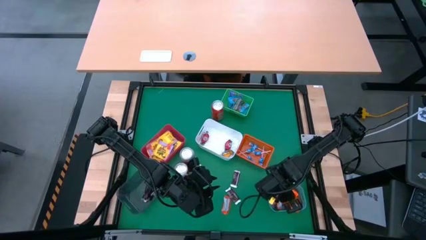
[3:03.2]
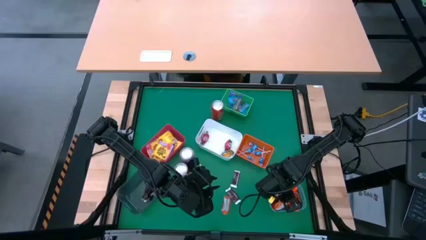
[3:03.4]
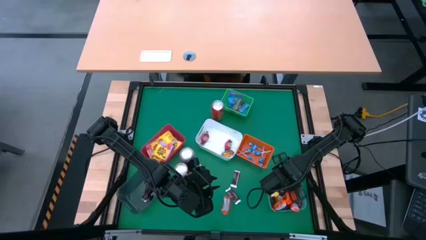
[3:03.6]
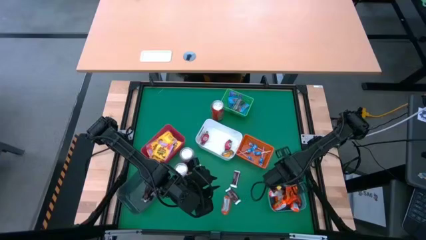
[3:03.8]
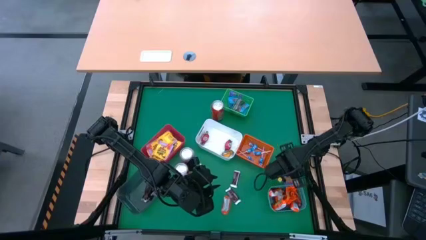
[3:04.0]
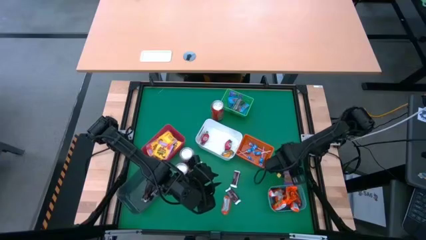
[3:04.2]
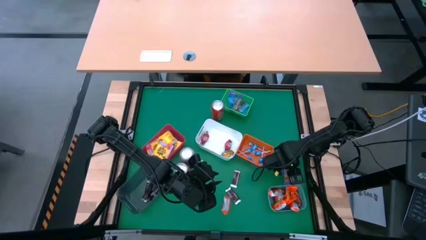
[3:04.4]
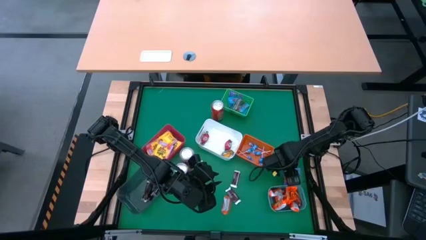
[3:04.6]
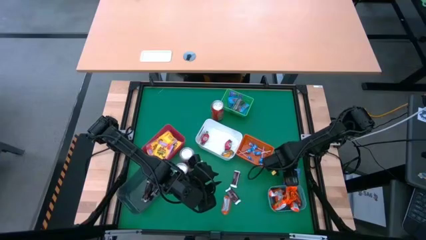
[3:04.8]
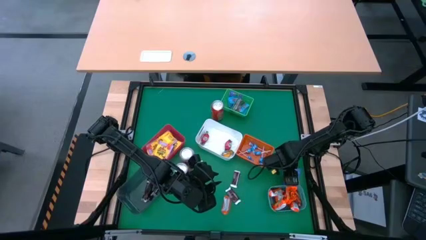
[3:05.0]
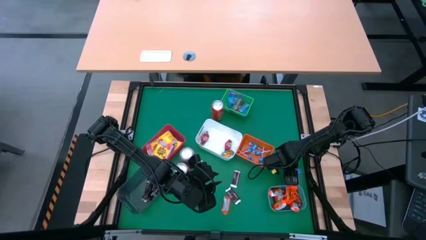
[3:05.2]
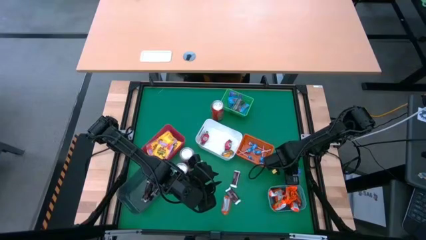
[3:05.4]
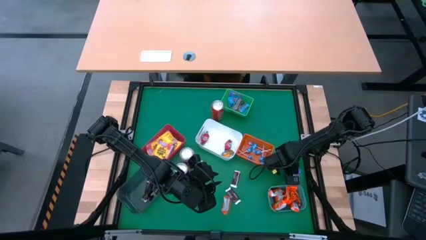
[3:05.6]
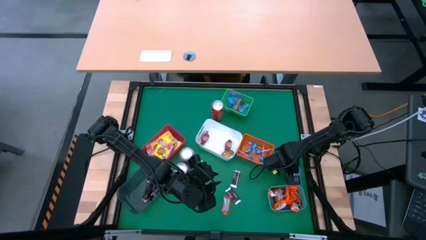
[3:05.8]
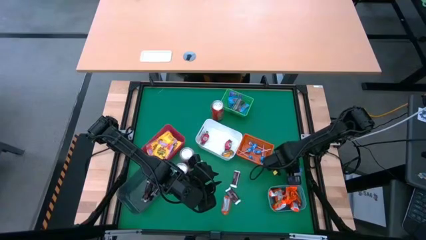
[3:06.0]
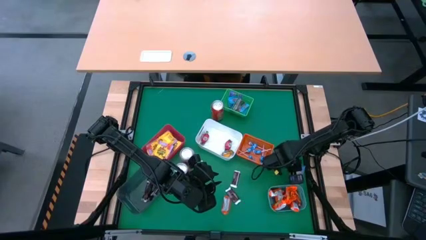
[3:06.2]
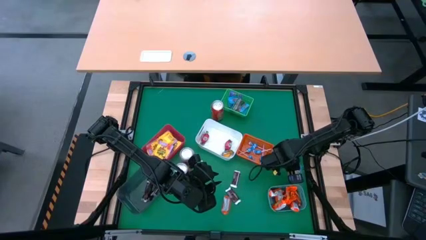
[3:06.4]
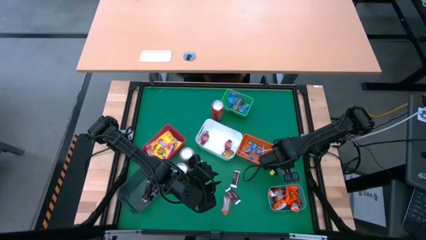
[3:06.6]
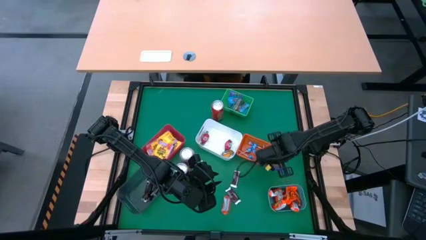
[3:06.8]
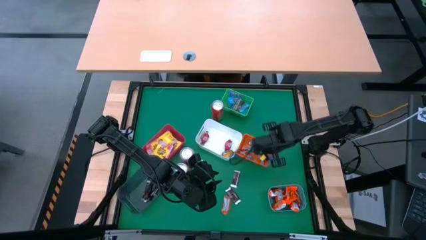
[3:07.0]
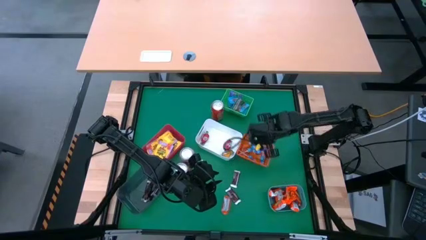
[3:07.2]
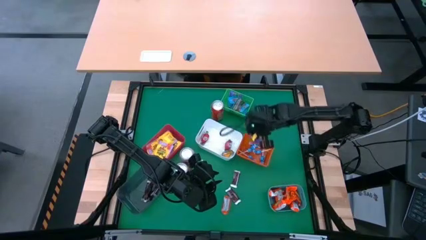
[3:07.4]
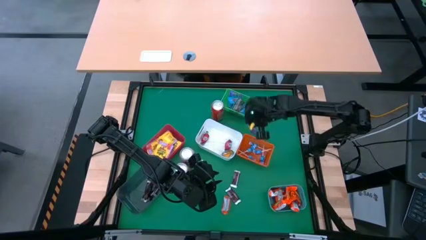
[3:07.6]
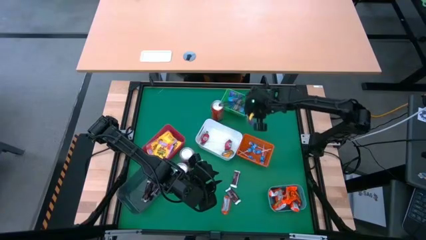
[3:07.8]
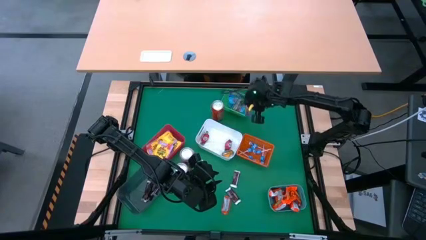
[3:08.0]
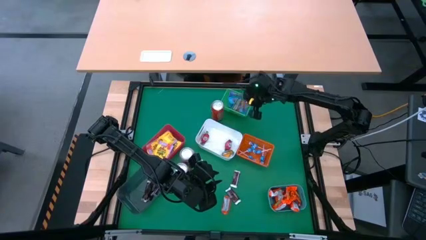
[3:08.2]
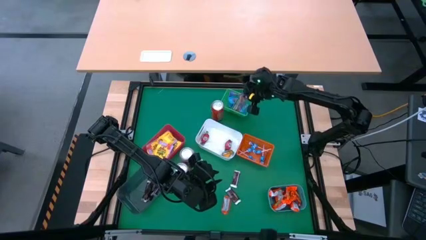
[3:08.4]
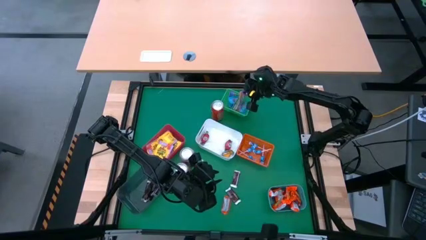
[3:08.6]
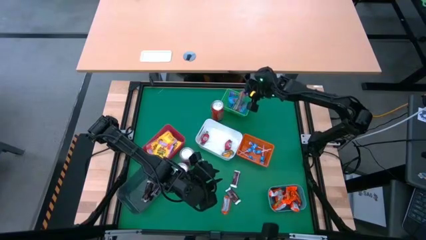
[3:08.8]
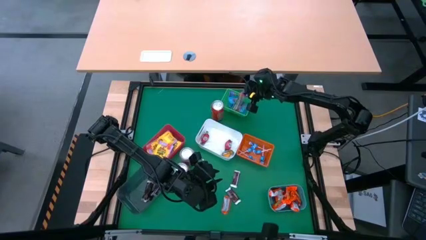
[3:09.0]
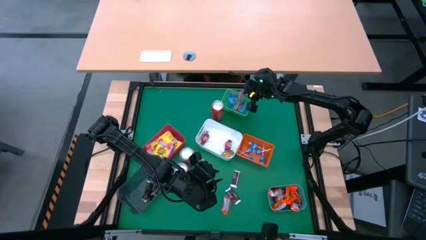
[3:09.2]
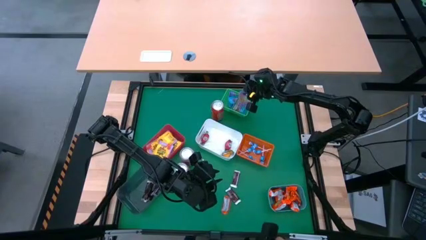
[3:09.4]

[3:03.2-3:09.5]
Task: Sort candy
Put the violet candy into the green bin

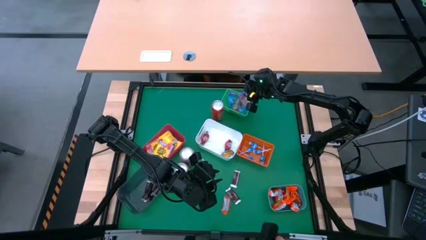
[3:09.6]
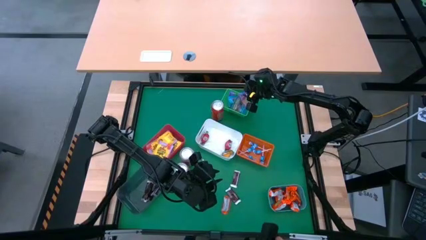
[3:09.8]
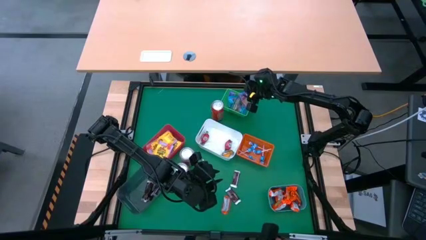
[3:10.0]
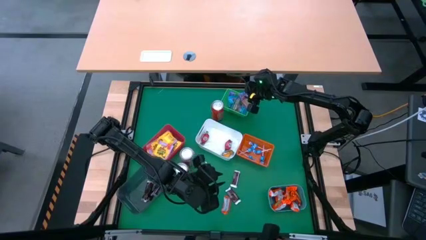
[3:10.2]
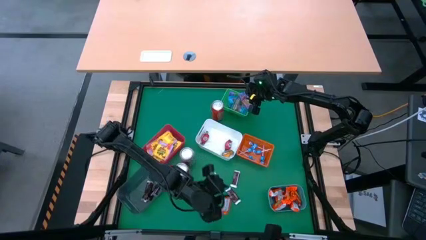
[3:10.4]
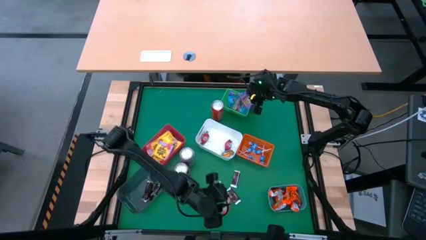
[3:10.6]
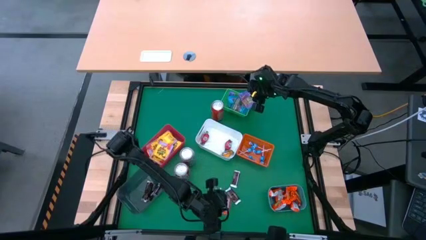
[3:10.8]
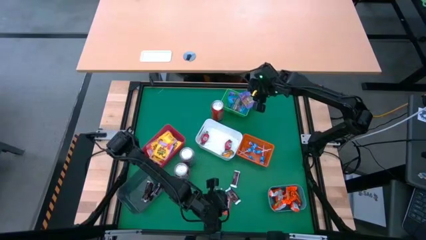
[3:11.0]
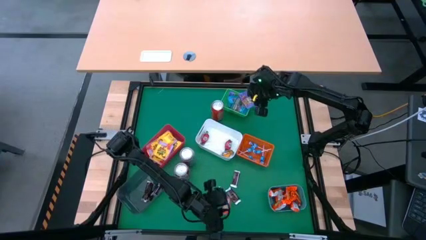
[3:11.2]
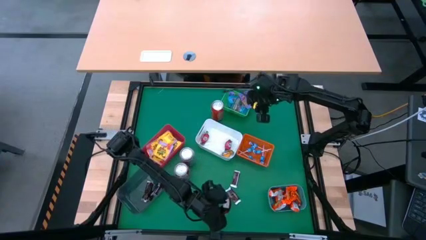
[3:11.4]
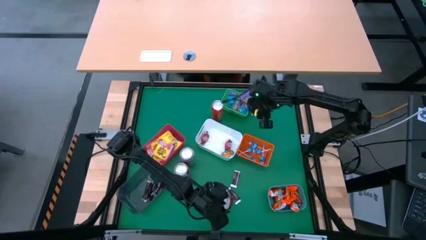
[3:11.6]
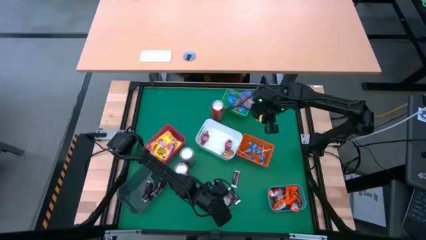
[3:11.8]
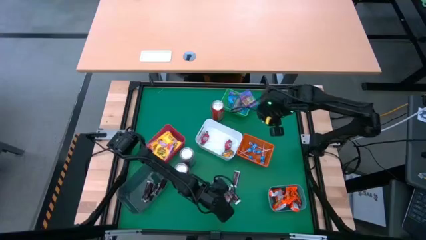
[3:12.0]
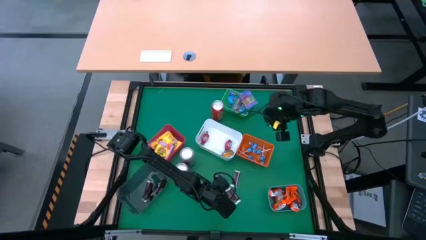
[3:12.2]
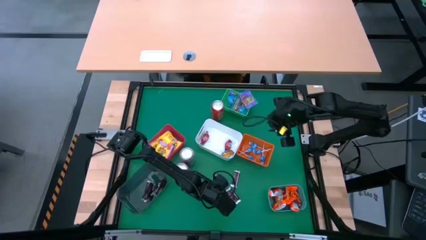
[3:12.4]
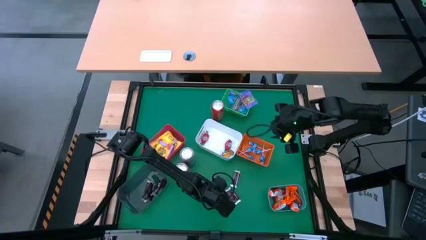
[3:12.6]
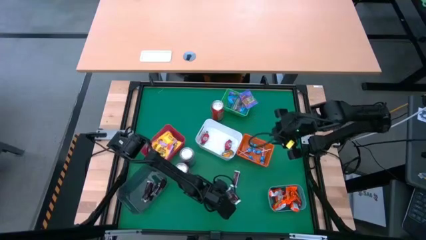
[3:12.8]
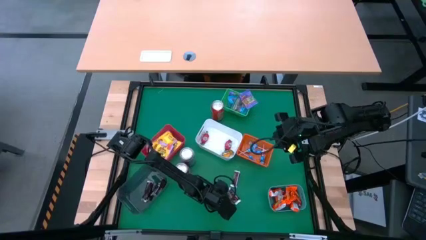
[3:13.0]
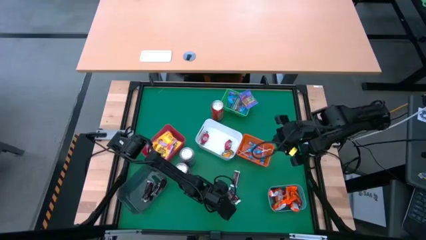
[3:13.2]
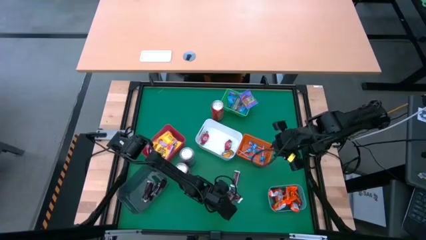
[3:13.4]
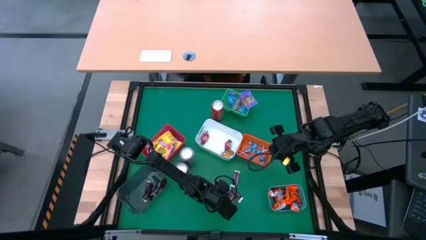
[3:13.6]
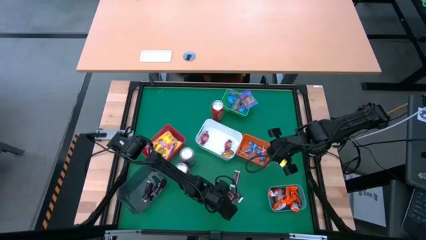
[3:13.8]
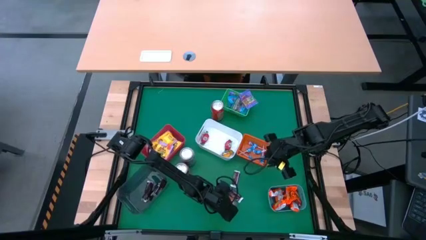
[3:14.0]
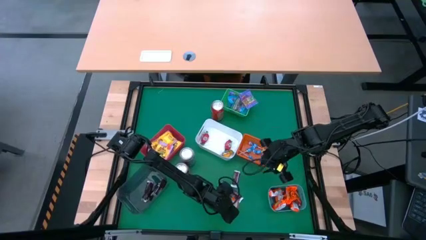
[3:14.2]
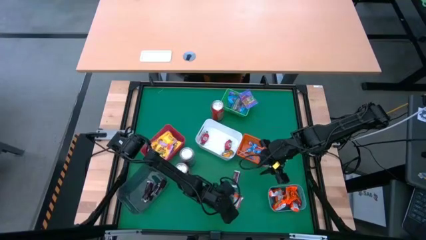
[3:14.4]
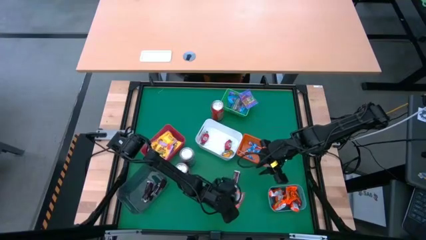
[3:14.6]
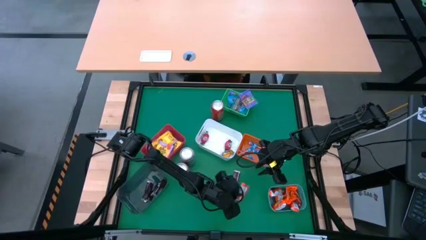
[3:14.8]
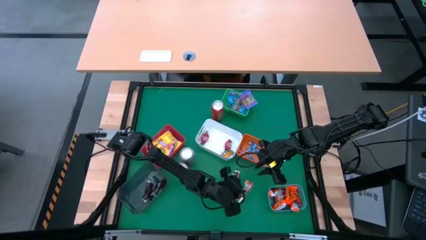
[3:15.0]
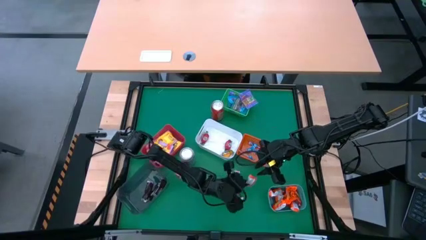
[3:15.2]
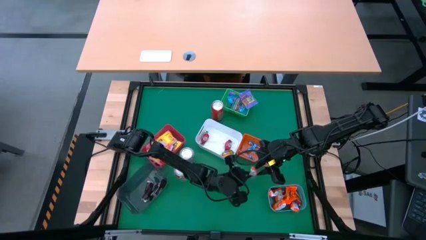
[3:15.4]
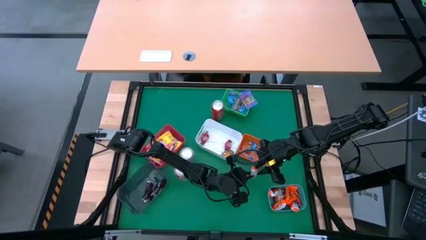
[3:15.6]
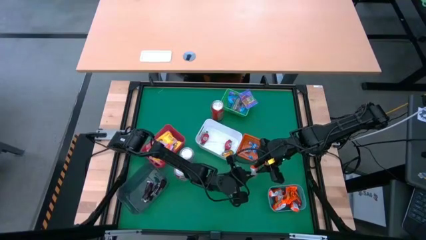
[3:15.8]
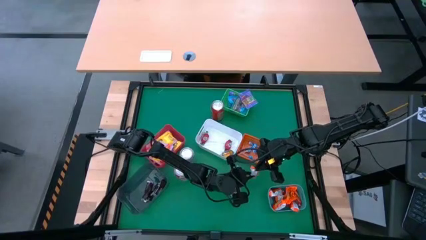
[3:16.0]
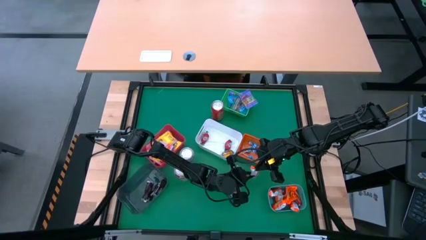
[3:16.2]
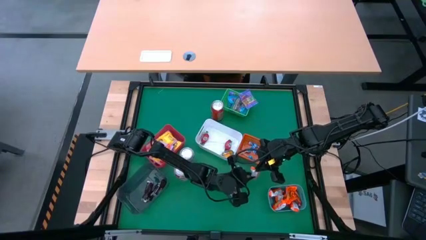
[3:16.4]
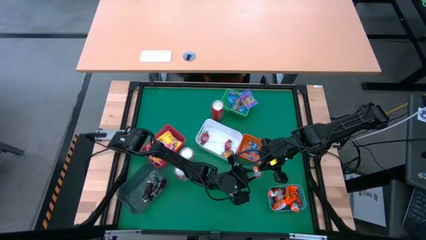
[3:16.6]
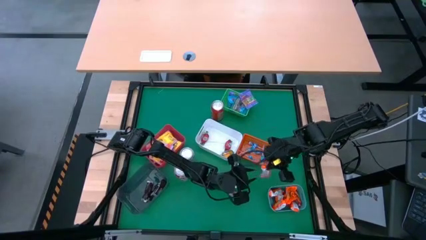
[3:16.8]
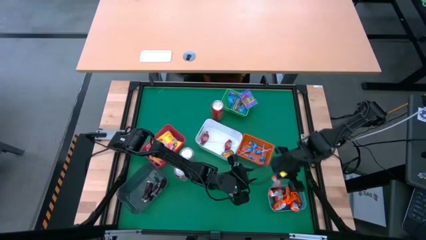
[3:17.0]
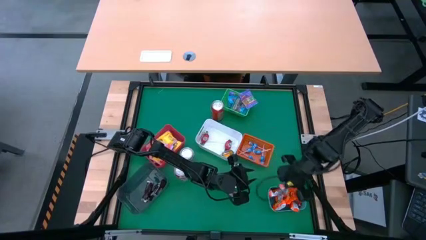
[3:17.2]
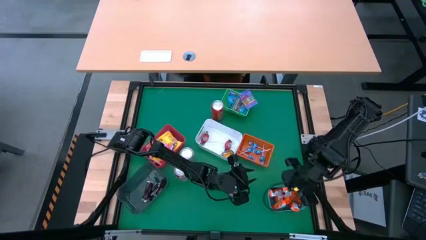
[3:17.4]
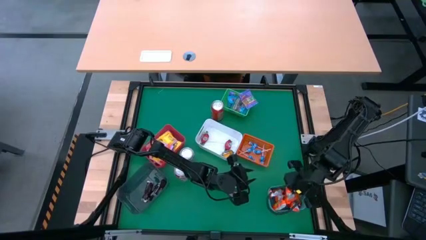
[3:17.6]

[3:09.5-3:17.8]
Put the orange chocolate into the blue bin
